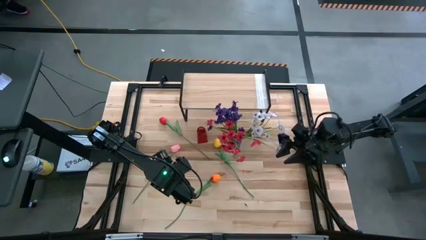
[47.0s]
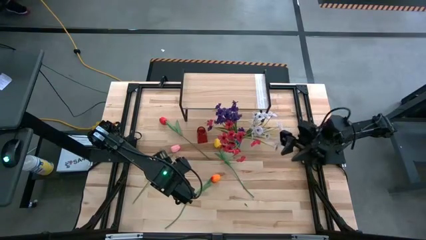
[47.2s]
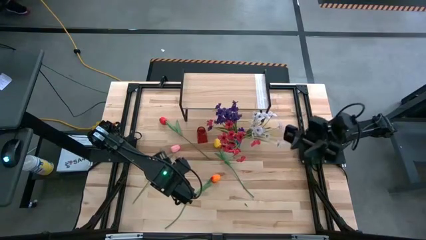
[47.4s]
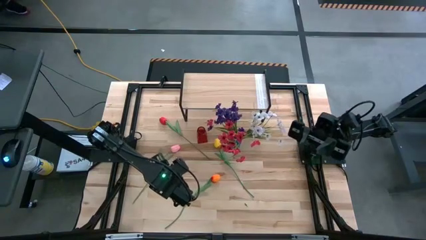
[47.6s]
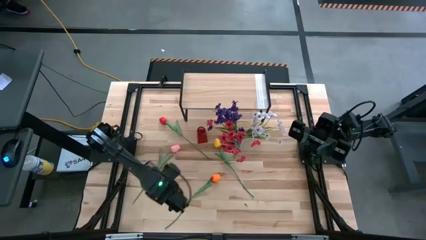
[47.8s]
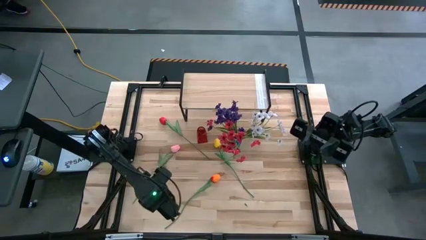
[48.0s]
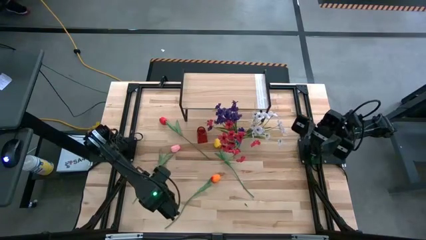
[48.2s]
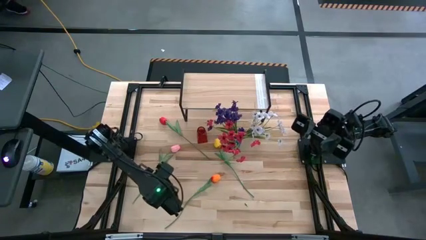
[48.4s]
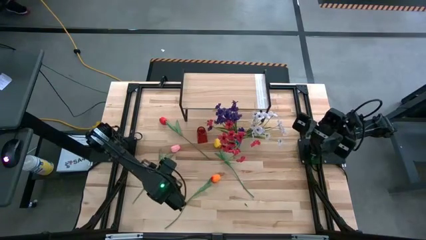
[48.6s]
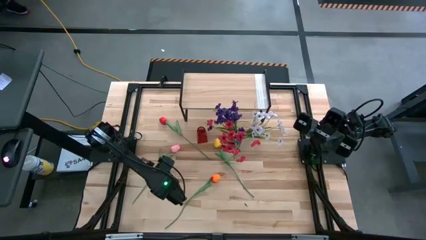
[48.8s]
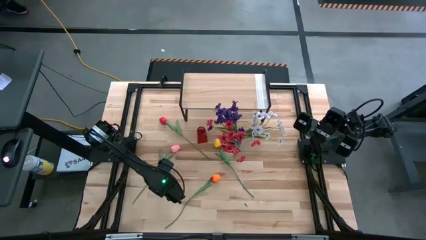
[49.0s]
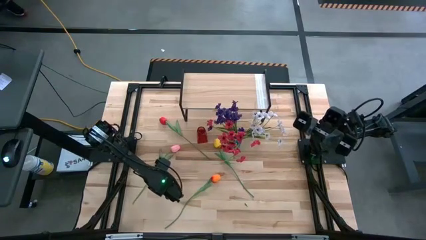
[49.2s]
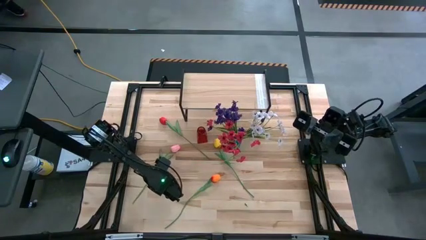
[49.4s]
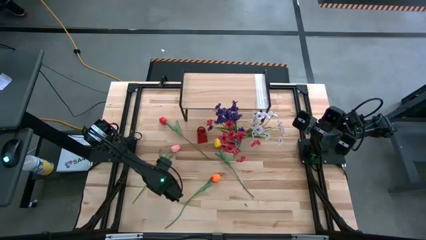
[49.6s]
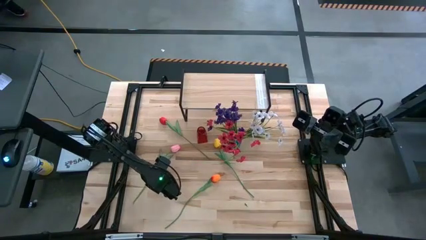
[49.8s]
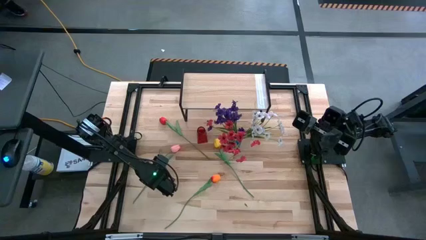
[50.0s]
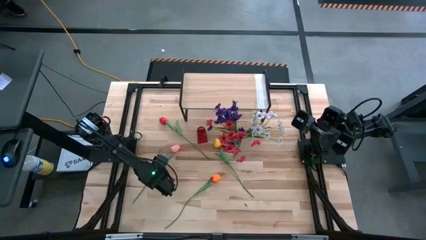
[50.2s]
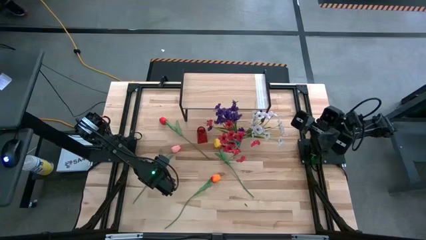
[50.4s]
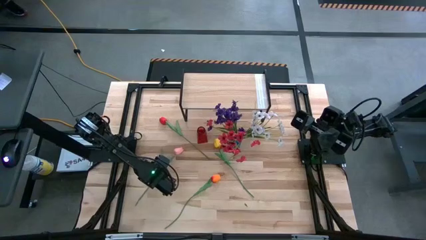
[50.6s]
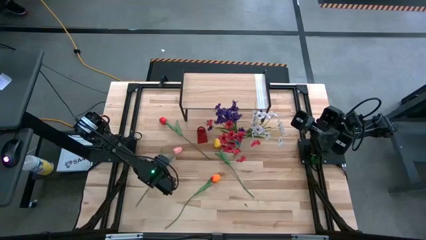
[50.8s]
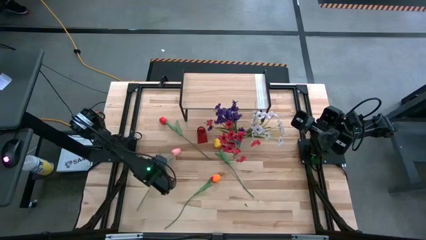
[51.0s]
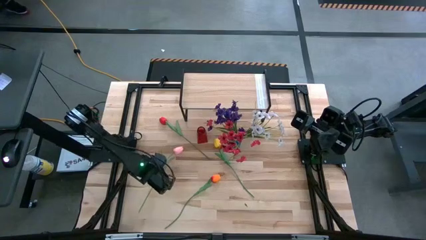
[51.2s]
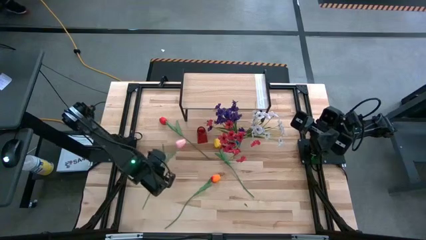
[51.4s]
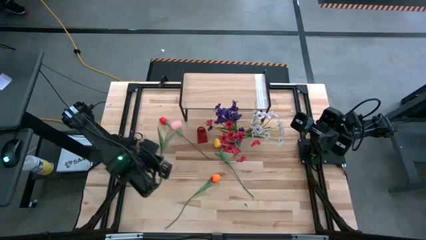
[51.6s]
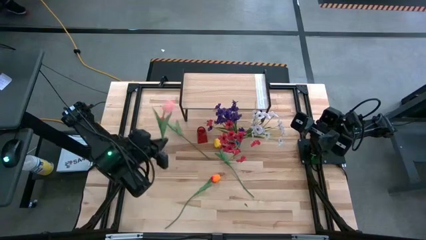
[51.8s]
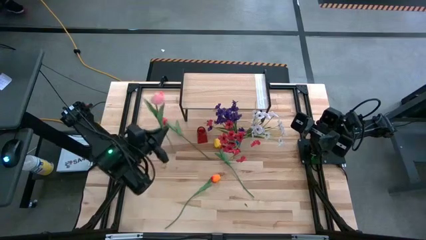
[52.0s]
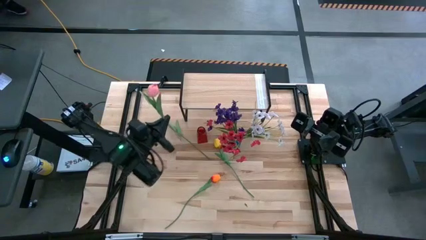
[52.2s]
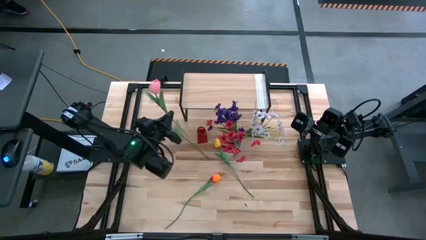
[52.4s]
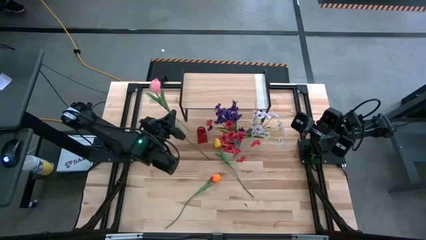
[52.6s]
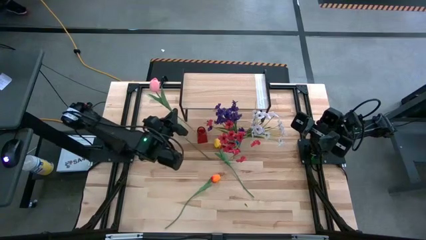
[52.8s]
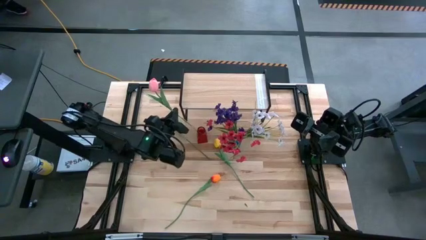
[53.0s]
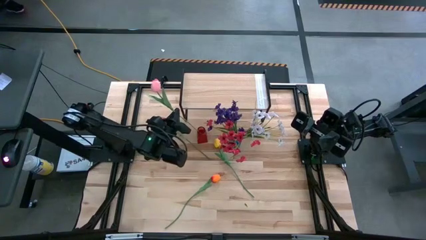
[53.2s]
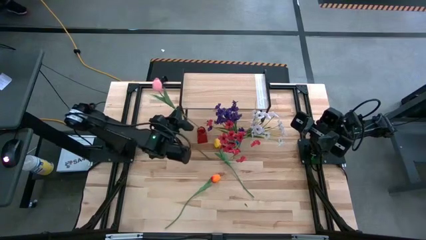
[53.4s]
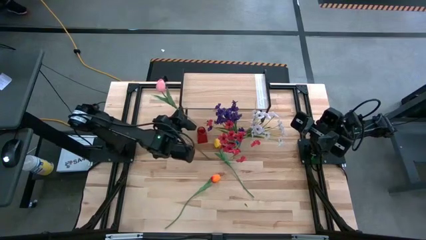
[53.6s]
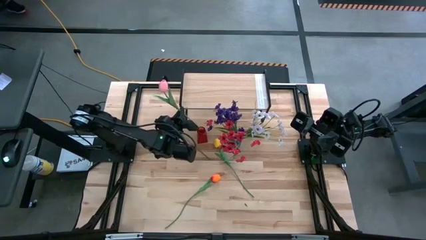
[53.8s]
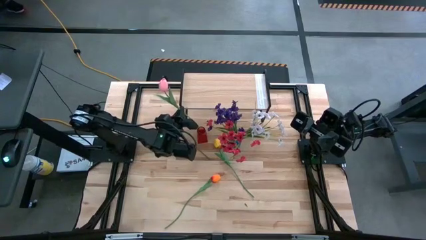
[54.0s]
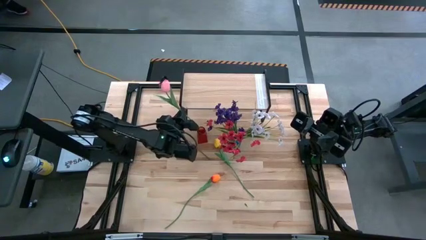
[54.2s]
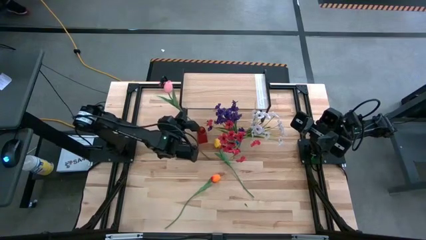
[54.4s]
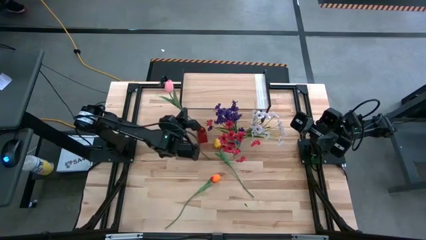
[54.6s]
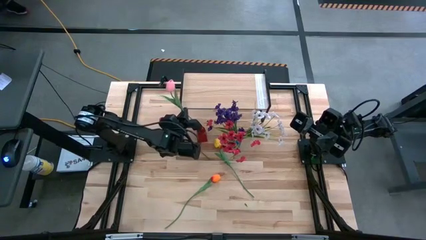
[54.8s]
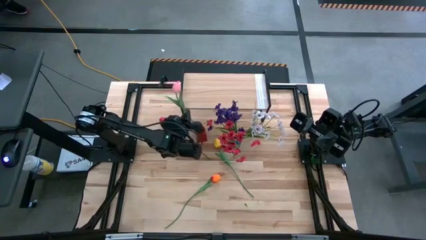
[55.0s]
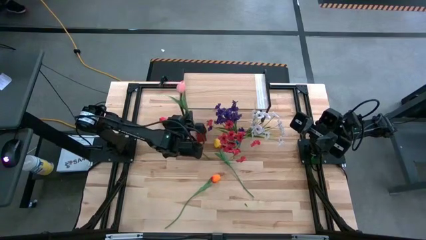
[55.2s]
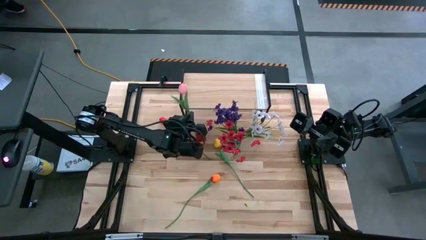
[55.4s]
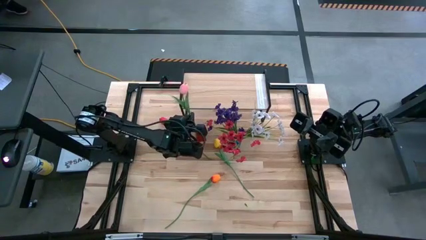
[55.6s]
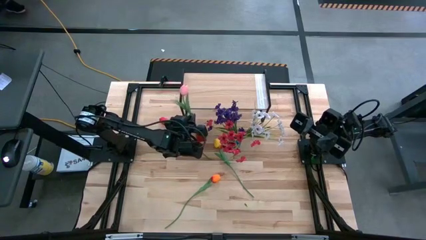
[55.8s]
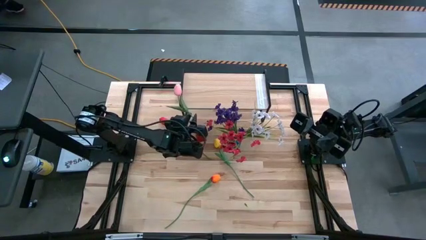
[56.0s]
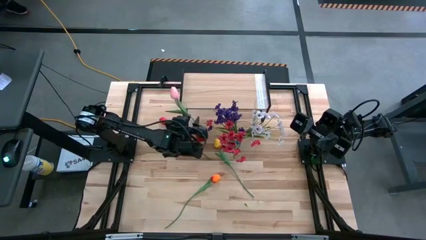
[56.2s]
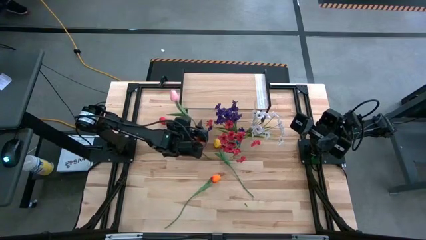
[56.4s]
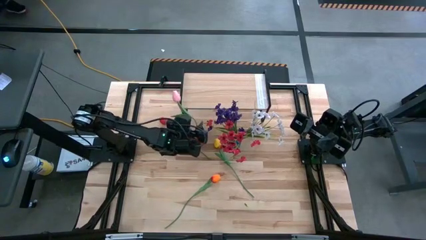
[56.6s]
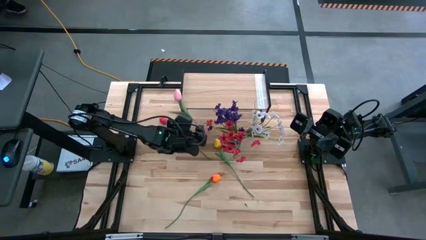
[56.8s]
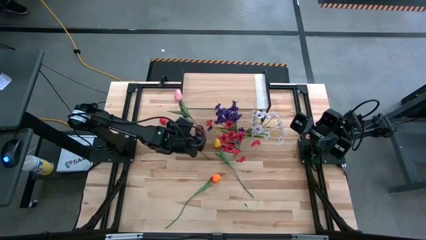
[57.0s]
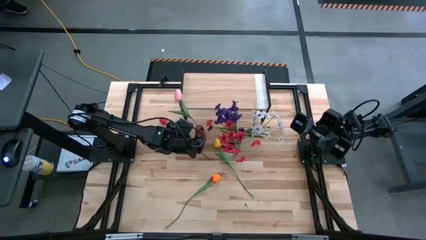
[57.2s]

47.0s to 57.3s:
Task: Pick and place flowers into a vace then onto a shelf
Put the pink flower into the red vase
